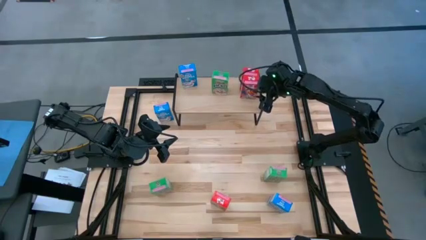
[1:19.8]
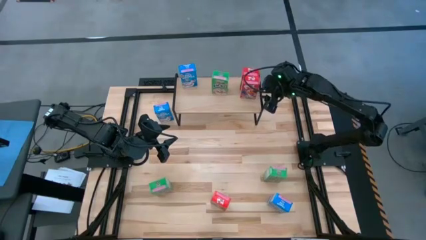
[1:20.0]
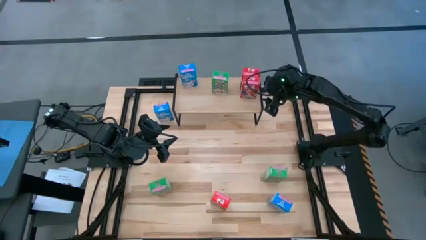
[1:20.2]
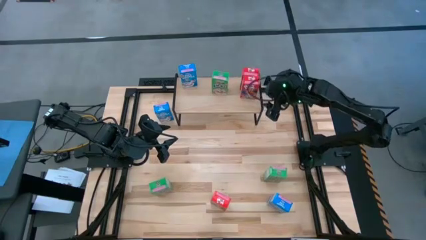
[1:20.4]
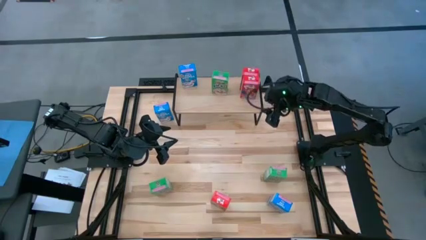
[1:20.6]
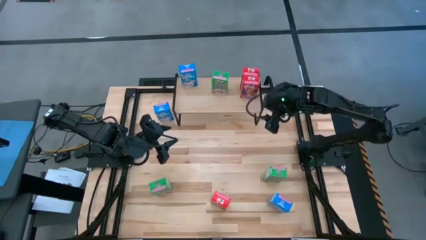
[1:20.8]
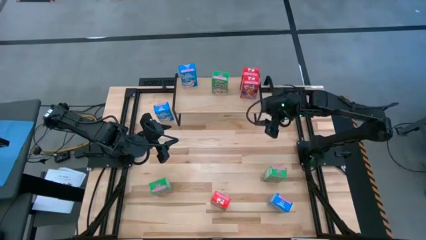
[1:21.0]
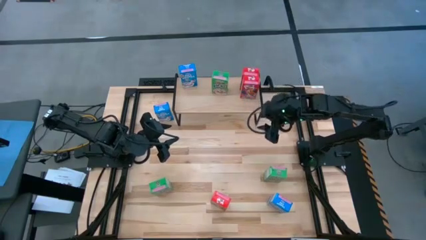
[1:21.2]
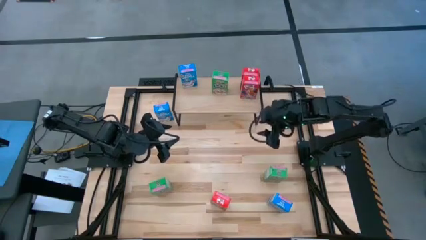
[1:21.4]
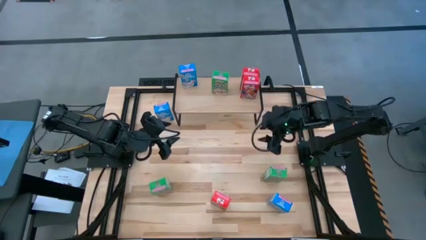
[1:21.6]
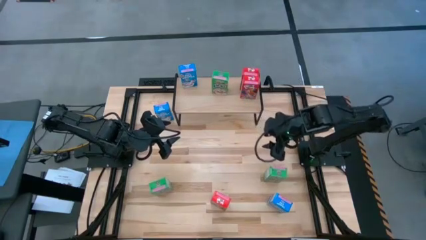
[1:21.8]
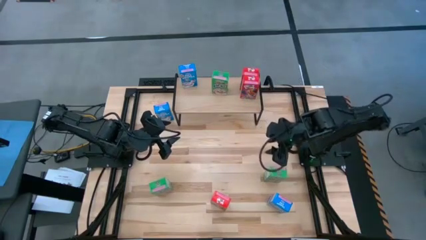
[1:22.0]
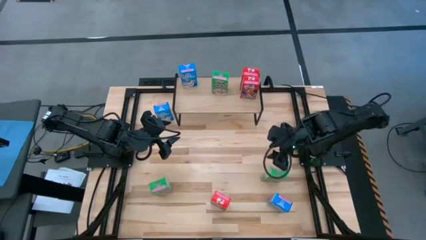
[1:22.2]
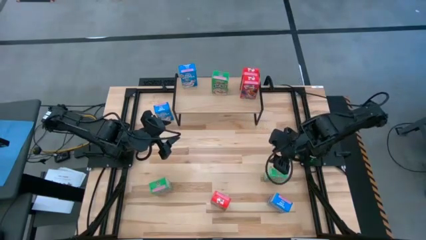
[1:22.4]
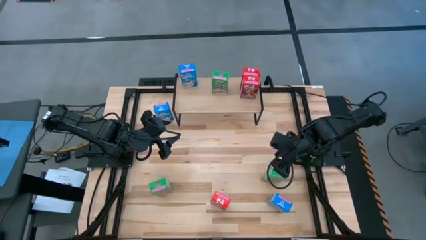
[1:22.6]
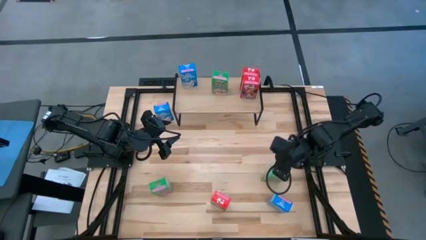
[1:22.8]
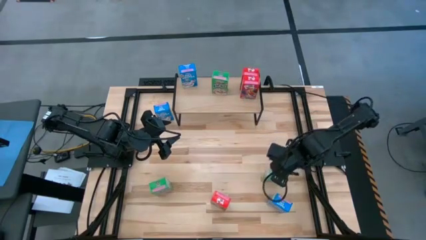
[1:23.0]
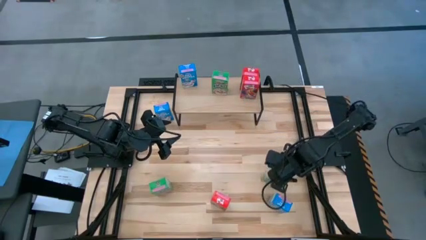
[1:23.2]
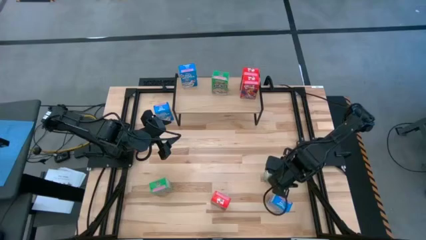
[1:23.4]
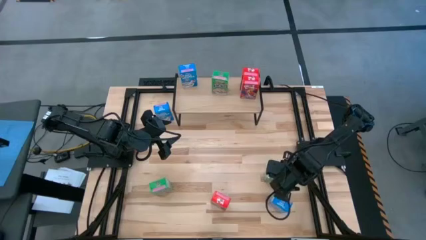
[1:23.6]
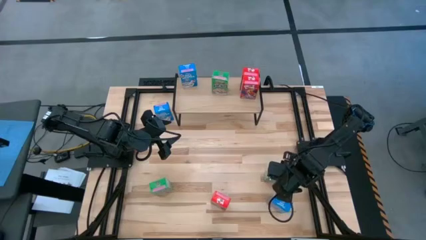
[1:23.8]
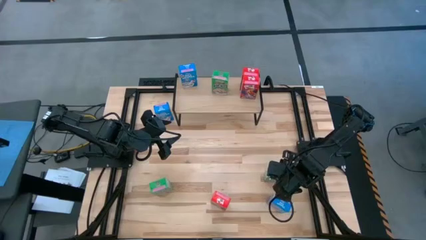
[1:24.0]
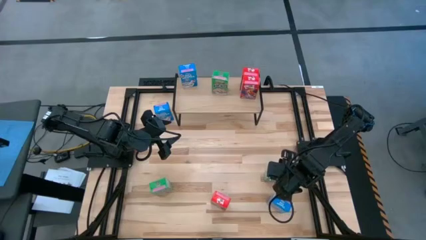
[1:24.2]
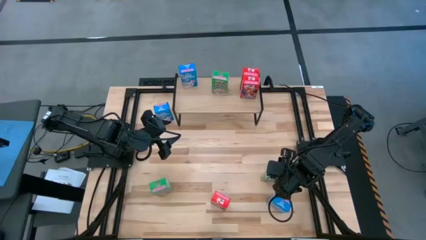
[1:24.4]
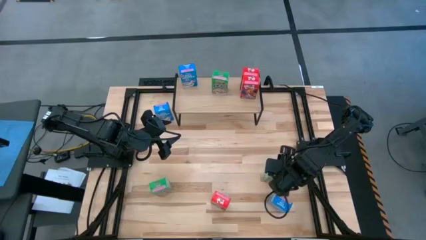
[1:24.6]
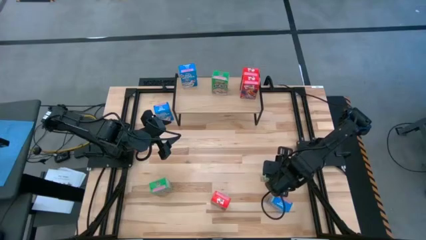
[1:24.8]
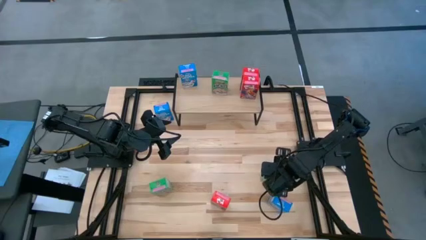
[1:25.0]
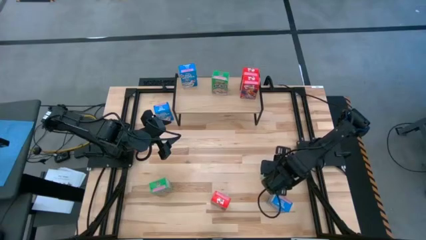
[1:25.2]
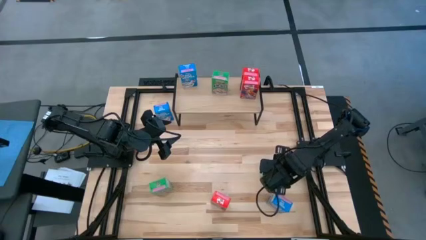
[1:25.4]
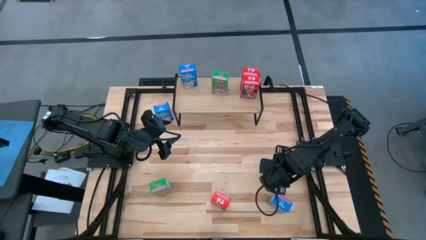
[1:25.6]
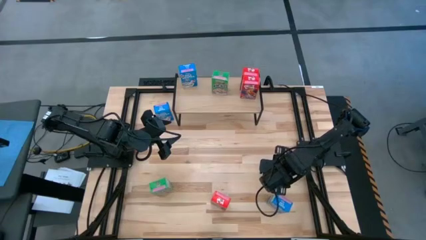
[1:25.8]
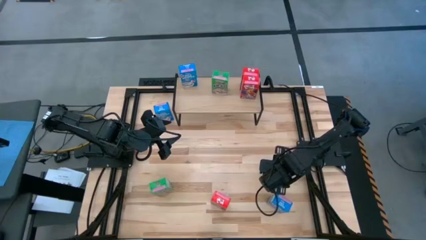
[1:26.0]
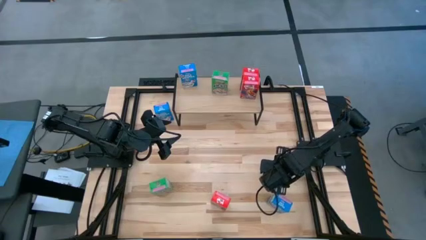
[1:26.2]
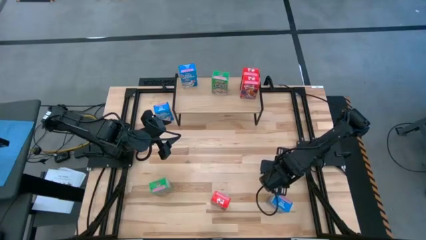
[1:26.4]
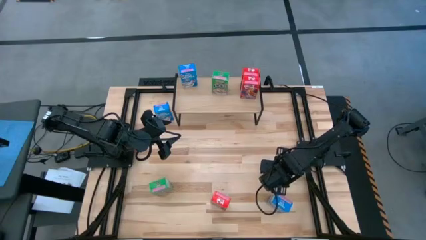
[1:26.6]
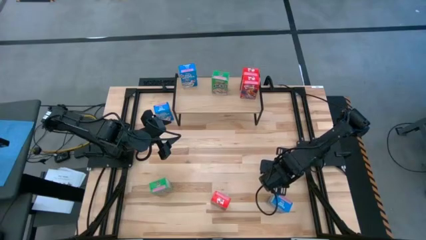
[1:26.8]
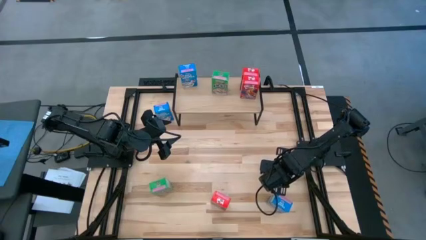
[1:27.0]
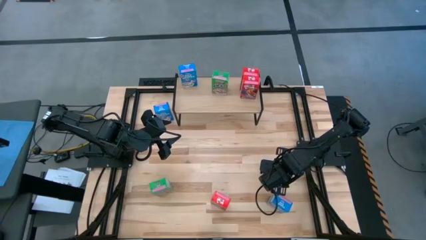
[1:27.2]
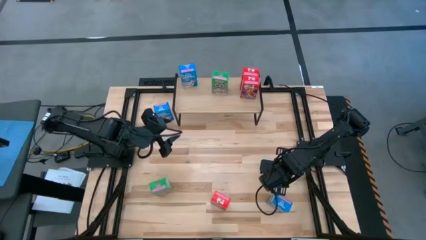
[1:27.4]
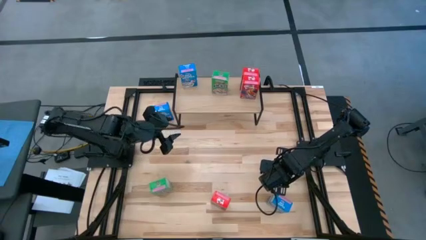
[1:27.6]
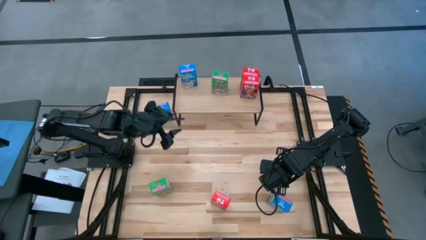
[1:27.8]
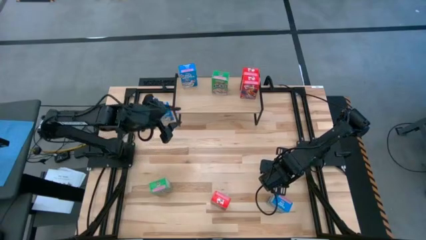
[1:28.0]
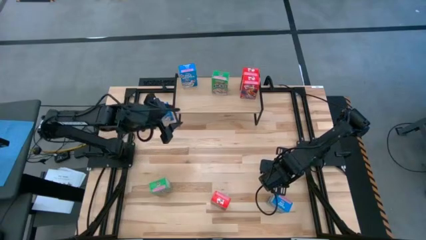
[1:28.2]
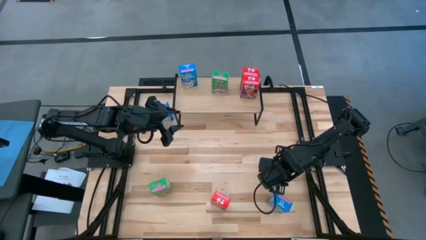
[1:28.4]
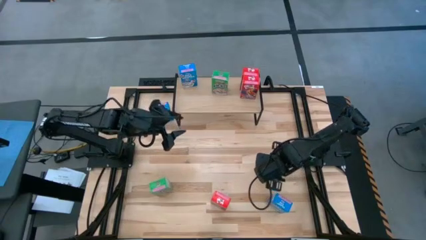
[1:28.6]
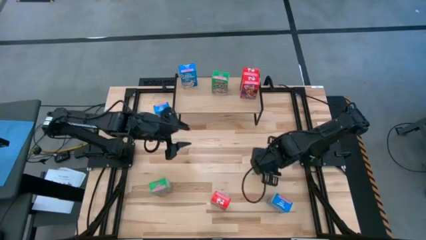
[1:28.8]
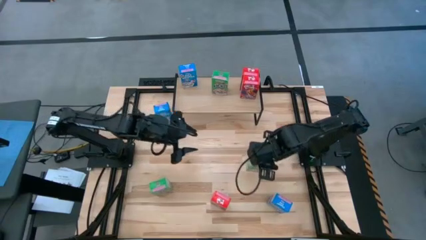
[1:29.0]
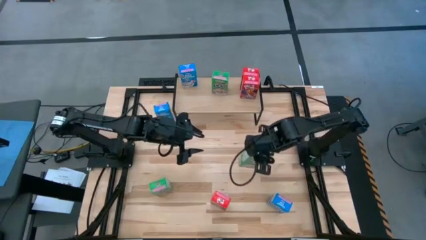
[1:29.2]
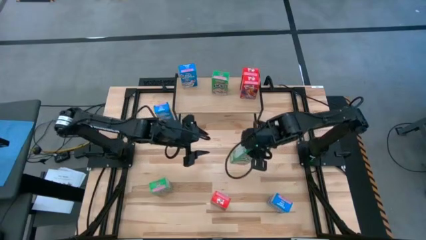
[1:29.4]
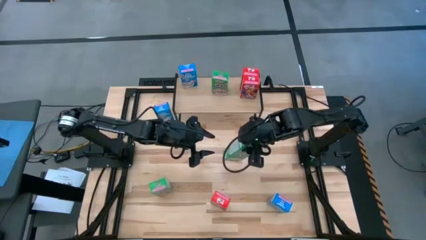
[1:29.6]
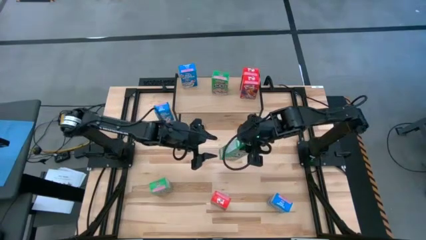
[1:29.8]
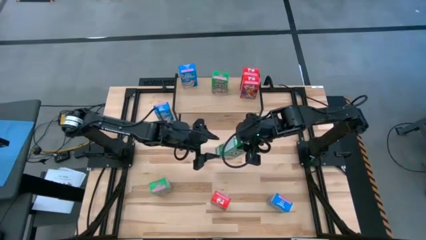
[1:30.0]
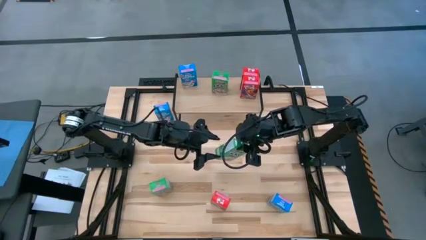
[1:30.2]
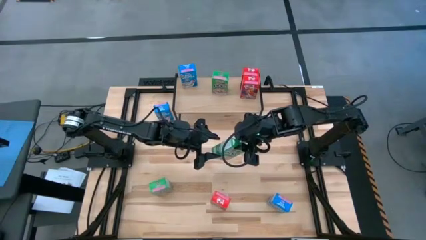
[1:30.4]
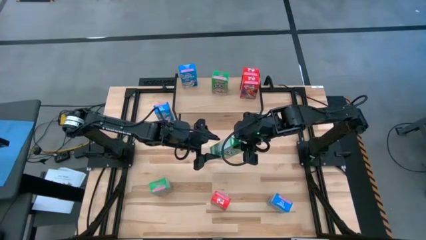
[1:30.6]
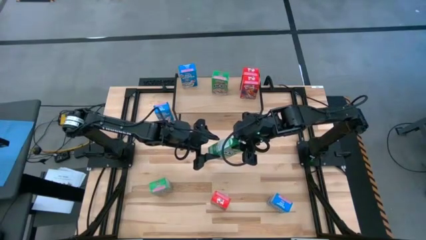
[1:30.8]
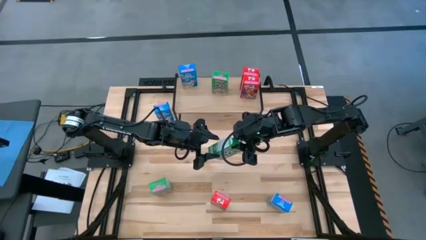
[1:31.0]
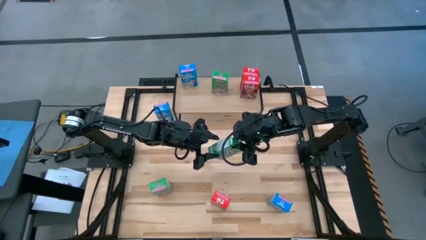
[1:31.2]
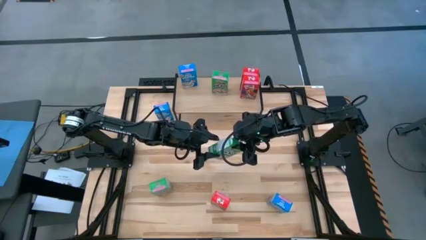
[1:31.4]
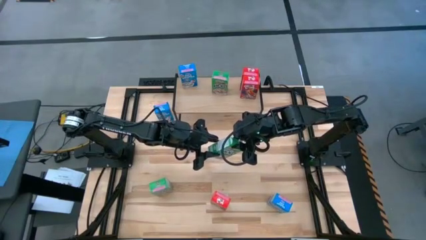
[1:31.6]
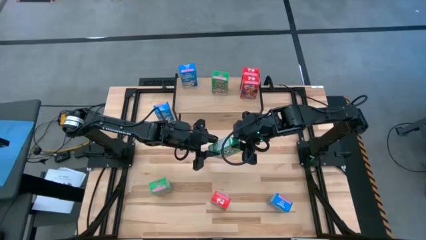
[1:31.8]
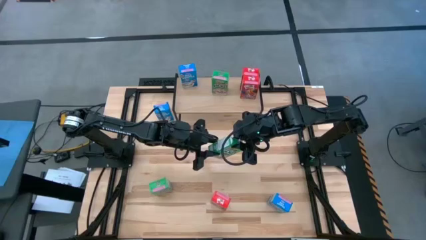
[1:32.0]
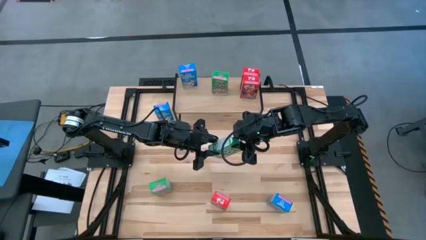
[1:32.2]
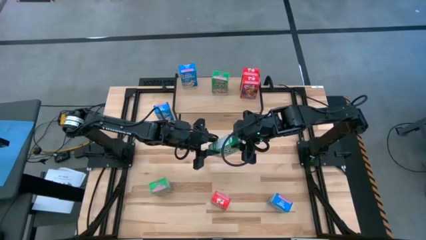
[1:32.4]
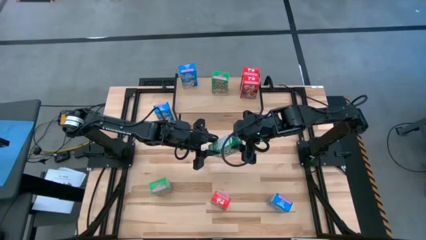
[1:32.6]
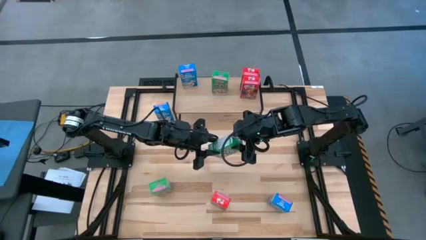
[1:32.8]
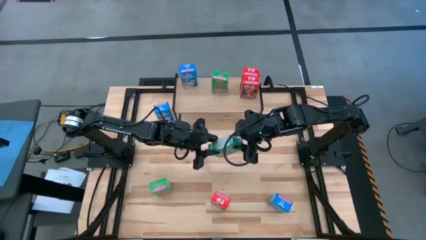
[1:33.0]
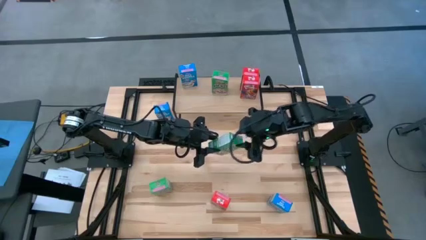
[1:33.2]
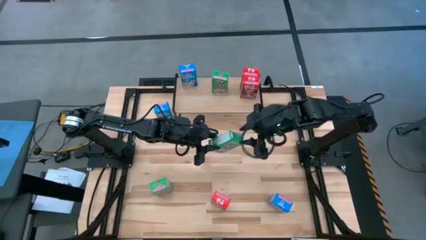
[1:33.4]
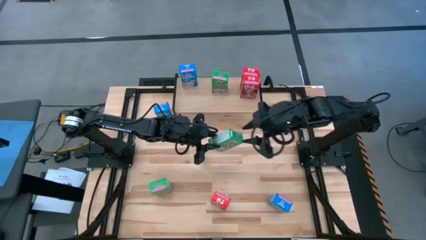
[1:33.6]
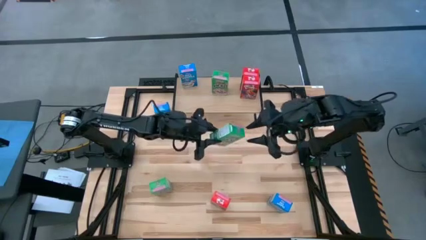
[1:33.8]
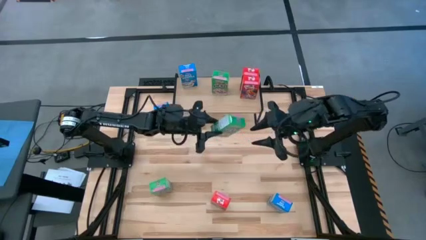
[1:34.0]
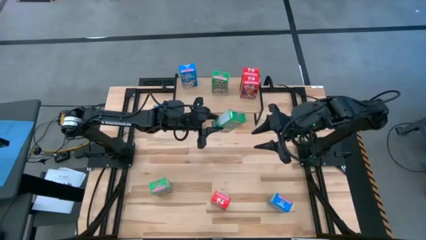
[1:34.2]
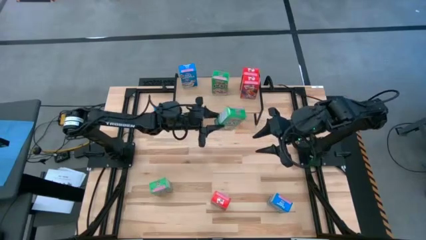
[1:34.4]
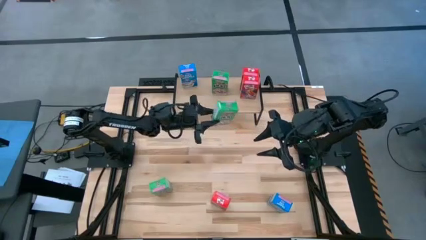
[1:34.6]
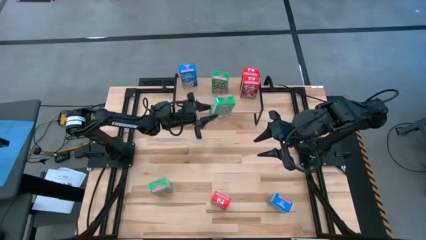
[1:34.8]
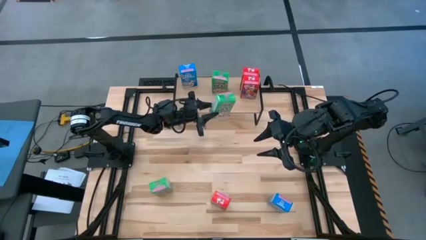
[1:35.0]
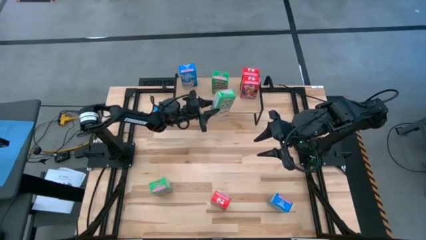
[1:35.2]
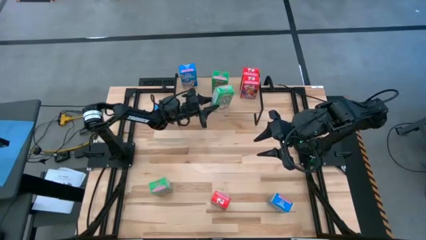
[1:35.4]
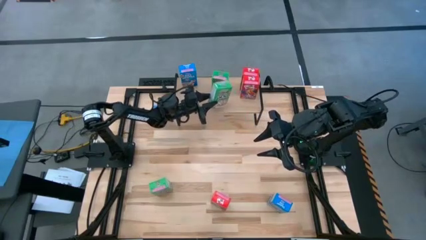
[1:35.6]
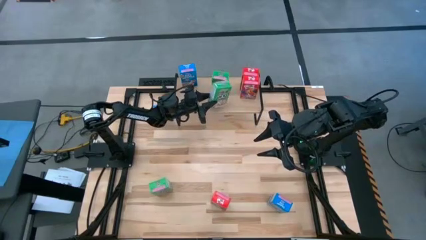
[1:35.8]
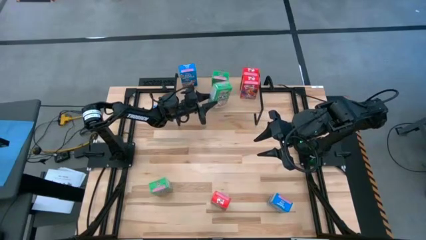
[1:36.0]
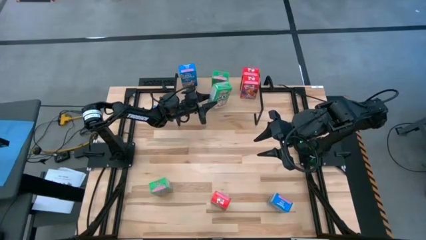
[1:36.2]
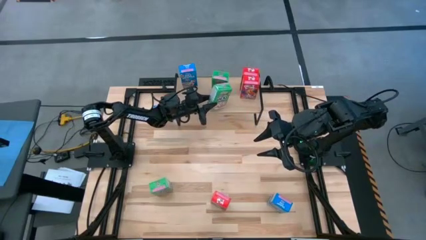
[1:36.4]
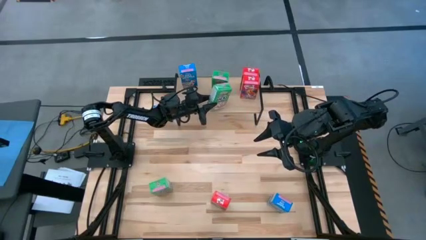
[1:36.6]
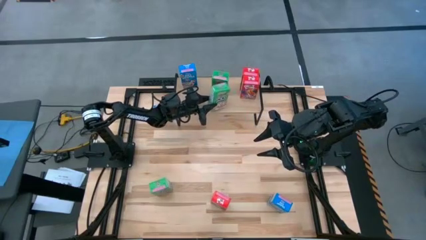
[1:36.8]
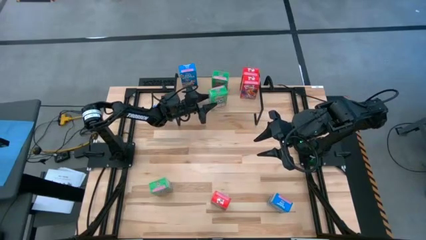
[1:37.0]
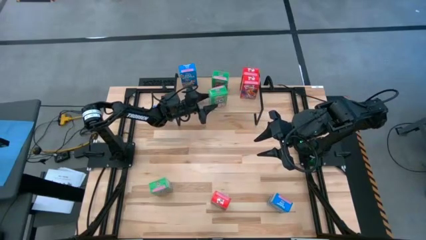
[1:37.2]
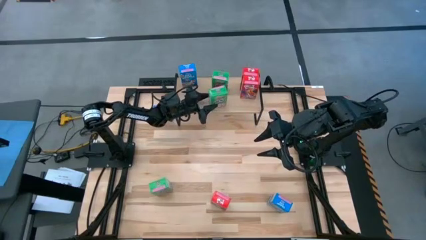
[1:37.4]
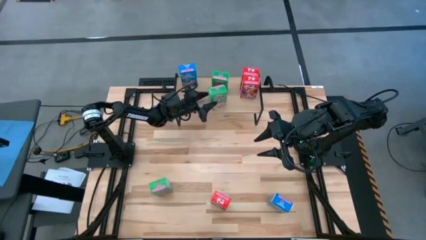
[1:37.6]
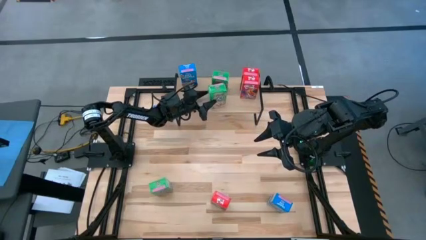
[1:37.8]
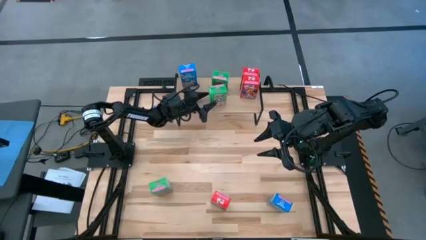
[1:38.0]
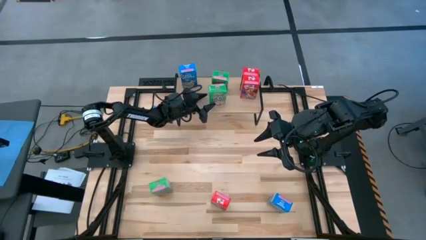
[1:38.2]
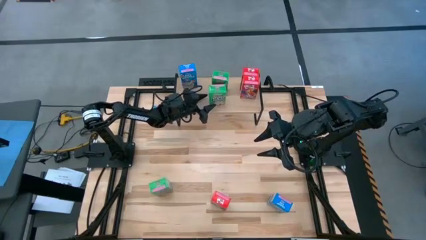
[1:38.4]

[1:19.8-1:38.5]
Task: Stack cereal on shelf
Put the right green cereal box on the shelf aligned with the other green cereal box
